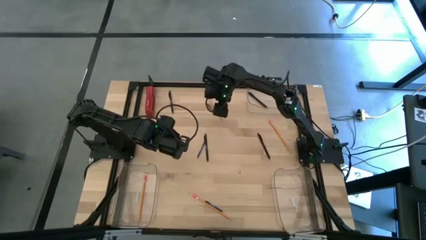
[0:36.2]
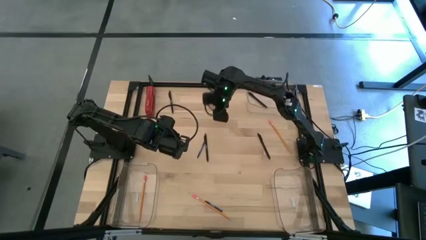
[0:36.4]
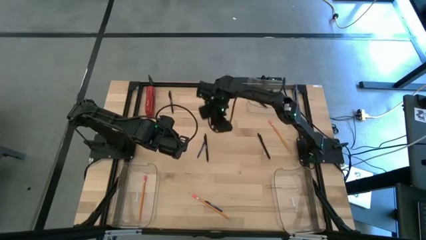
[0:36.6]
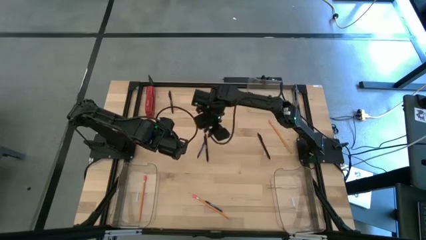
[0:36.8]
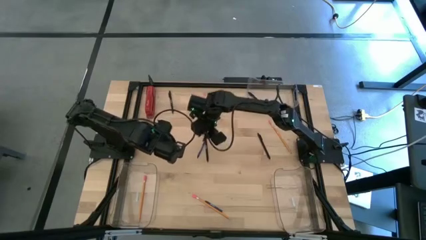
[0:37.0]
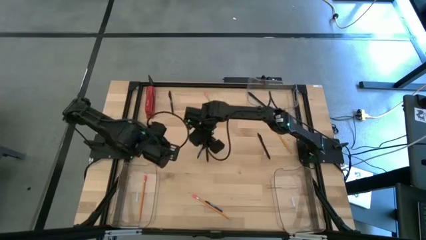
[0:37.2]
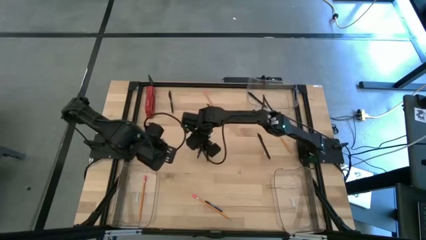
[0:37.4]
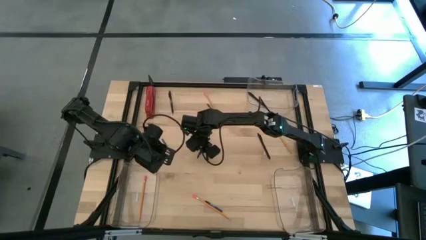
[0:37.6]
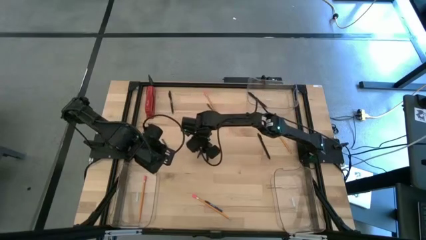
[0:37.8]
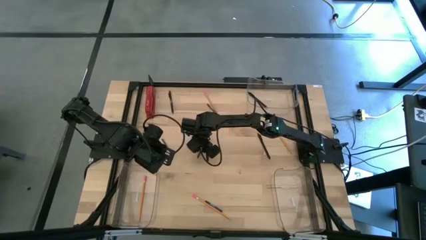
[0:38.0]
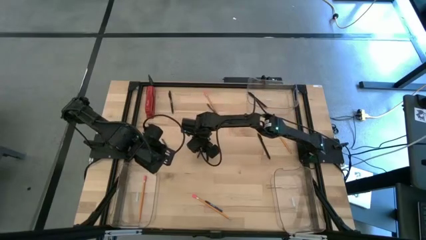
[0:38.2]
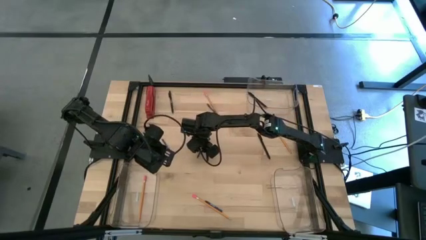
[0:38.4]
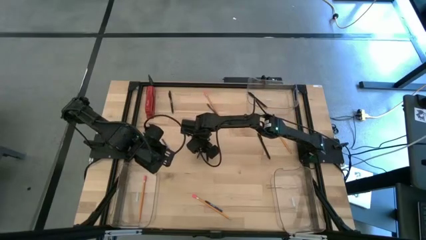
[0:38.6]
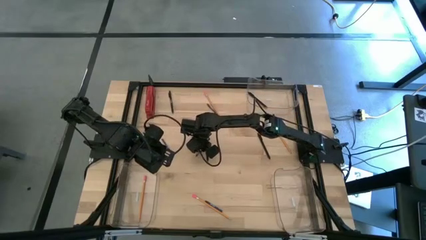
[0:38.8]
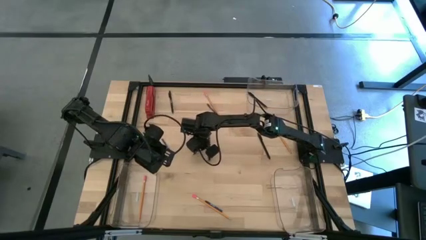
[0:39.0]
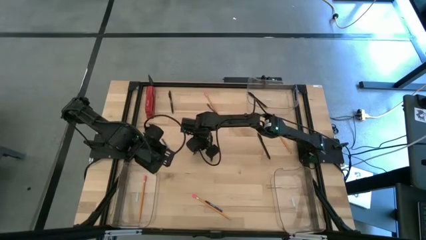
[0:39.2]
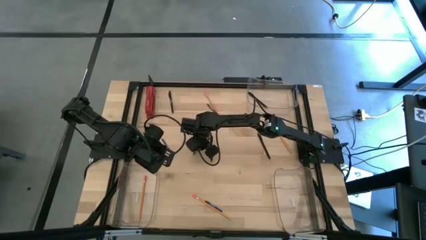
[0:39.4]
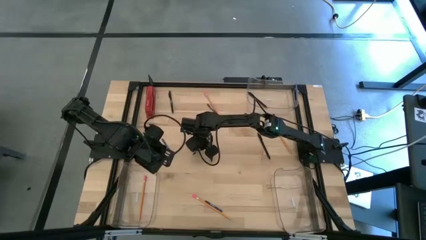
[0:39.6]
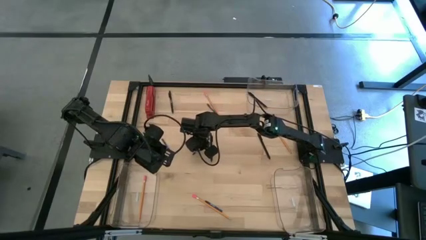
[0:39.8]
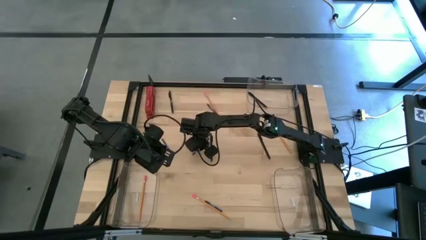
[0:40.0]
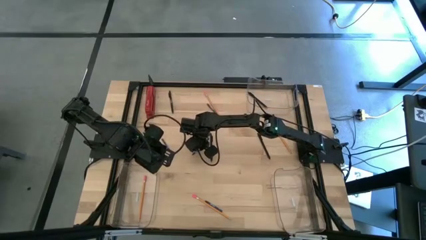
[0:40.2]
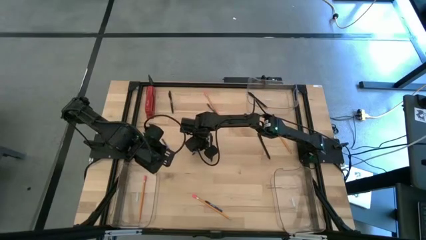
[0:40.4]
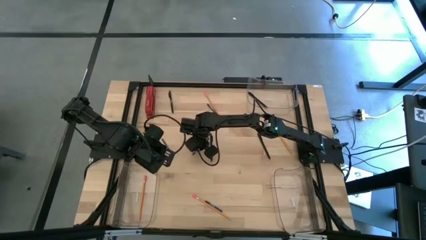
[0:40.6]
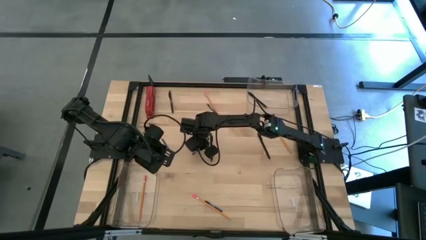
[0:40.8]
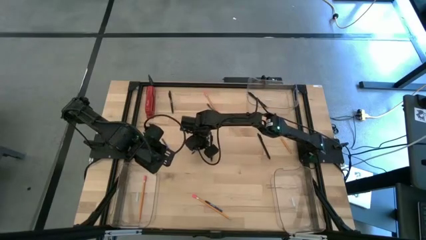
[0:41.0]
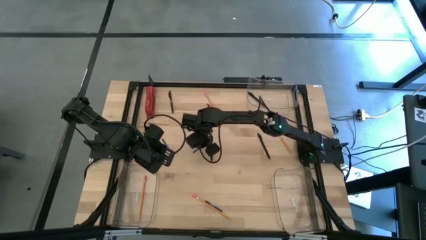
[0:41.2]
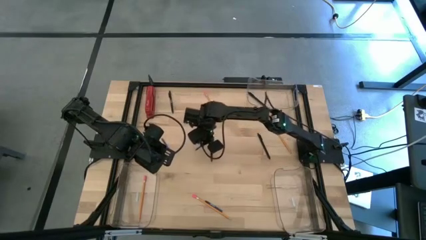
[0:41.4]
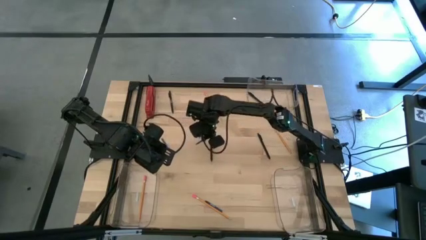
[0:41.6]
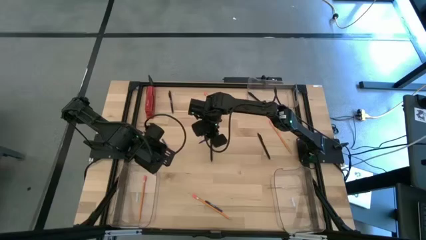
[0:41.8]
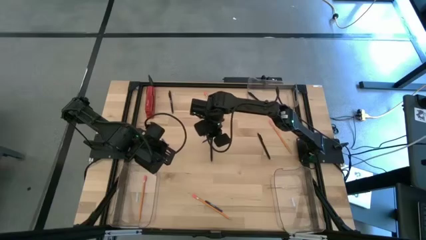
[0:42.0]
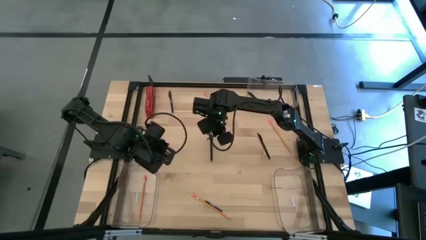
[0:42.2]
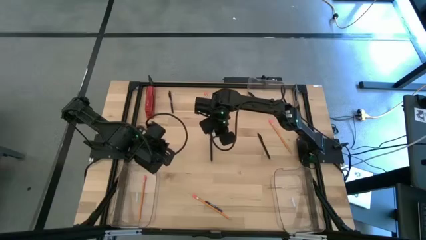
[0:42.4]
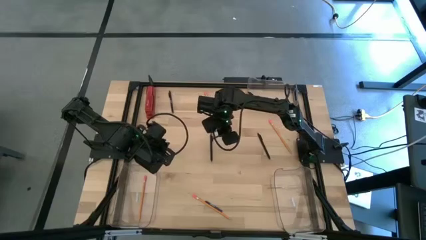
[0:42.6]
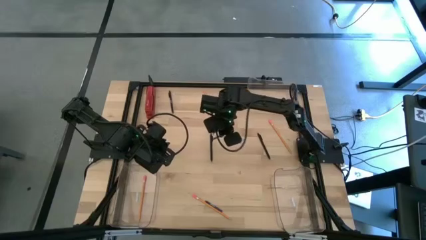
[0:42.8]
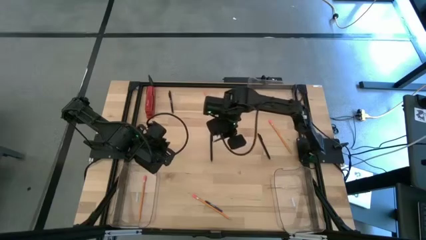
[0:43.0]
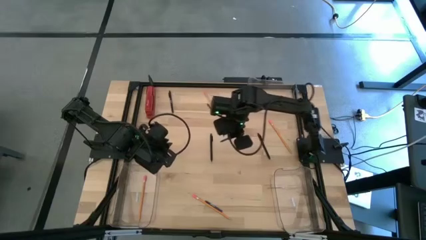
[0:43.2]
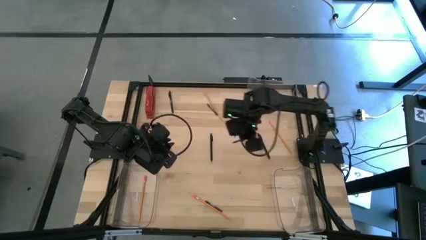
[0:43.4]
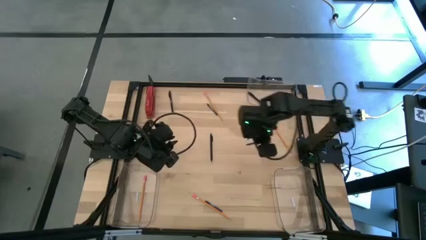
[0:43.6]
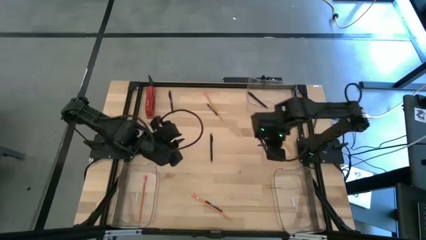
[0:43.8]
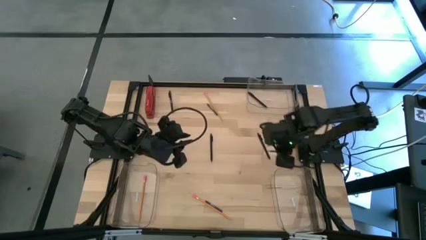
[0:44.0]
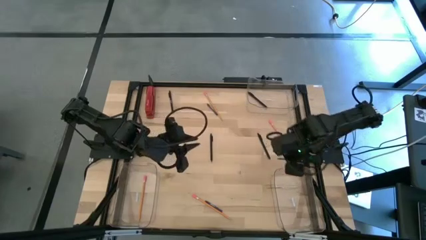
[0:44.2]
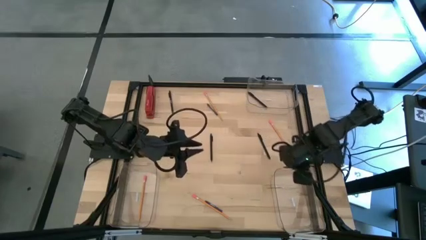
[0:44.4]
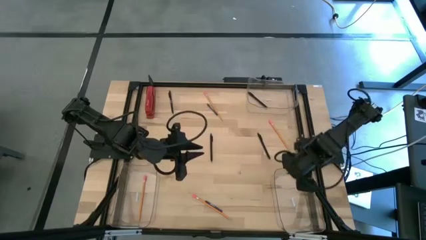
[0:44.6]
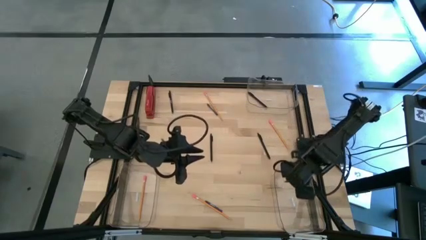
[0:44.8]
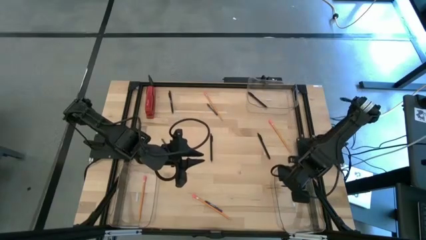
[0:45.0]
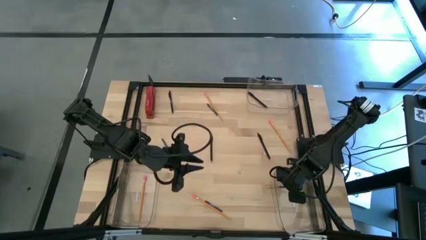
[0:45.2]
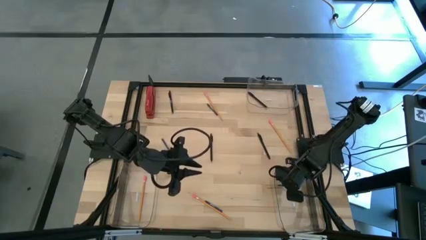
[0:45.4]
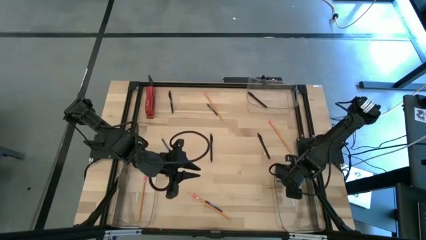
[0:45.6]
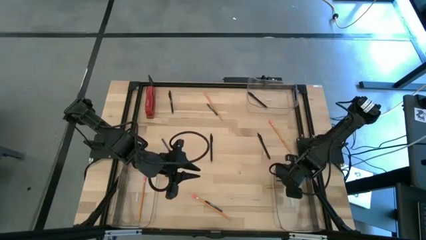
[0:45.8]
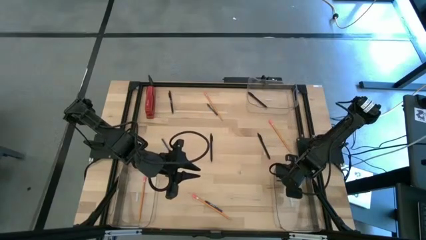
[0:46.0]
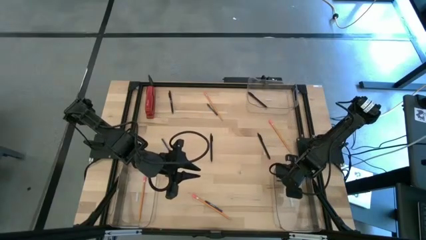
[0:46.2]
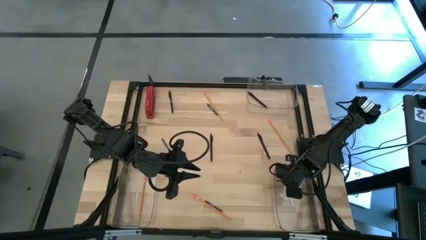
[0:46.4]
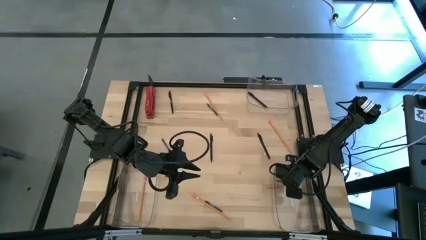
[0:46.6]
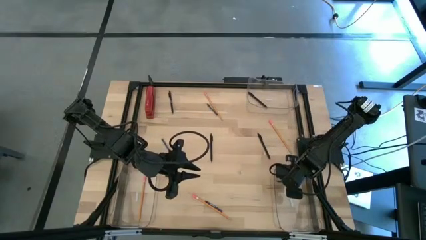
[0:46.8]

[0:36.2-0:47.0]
Task: Sort crayons/erasers/pens/pencils in bins
Put the blue crayon into the bottom right transparent bin
